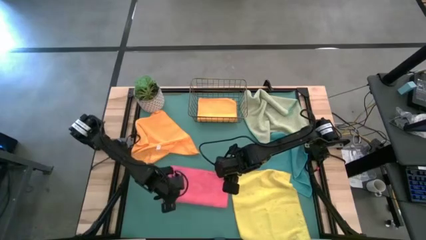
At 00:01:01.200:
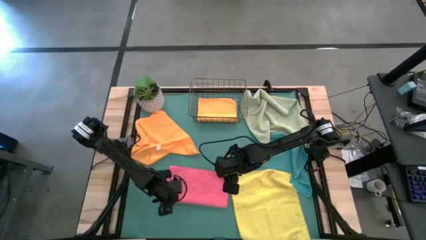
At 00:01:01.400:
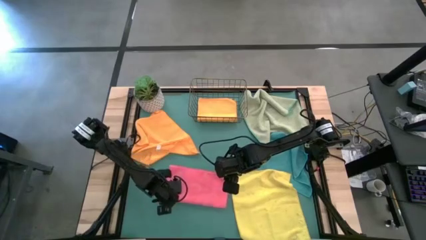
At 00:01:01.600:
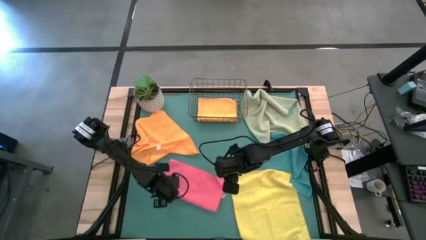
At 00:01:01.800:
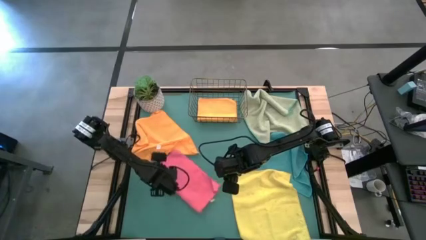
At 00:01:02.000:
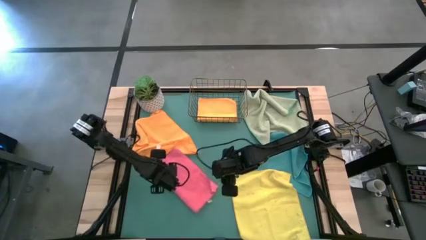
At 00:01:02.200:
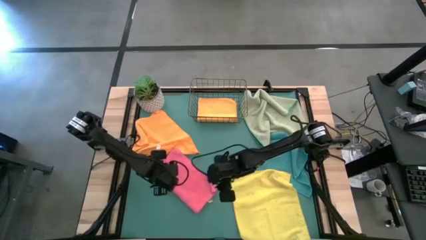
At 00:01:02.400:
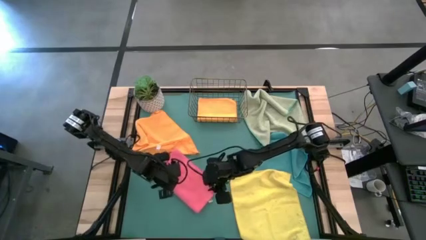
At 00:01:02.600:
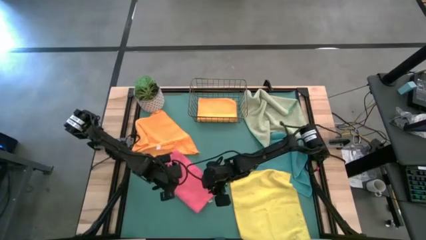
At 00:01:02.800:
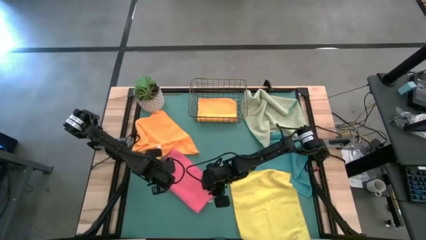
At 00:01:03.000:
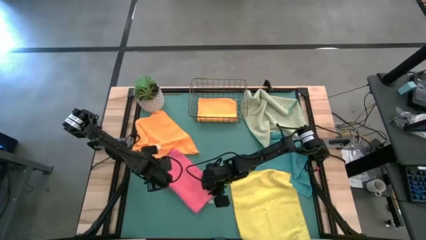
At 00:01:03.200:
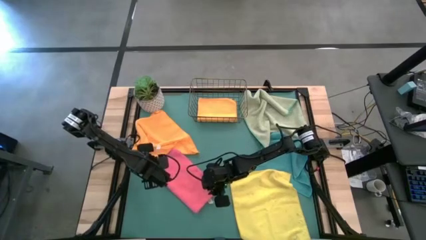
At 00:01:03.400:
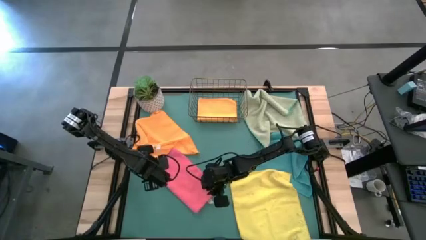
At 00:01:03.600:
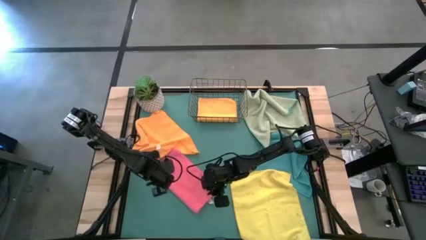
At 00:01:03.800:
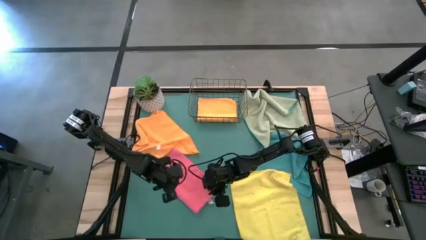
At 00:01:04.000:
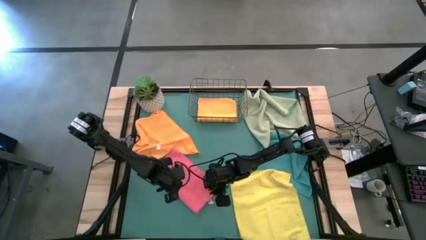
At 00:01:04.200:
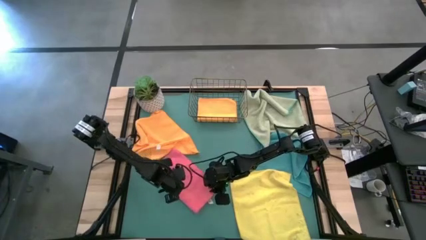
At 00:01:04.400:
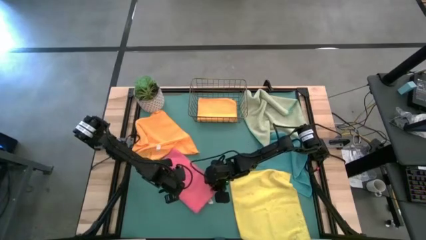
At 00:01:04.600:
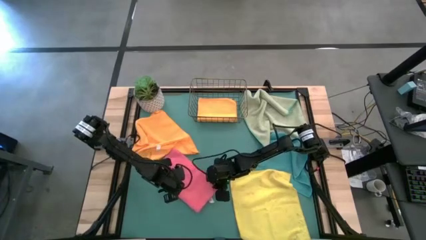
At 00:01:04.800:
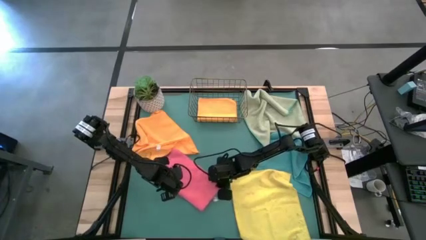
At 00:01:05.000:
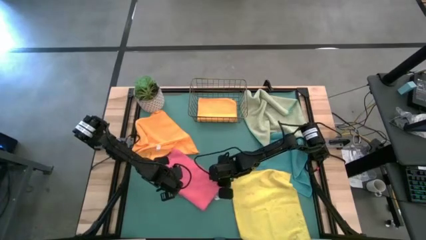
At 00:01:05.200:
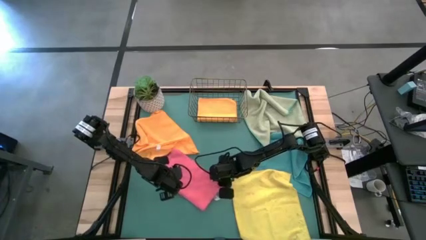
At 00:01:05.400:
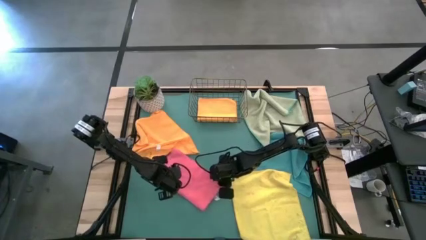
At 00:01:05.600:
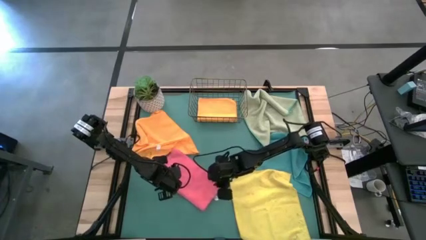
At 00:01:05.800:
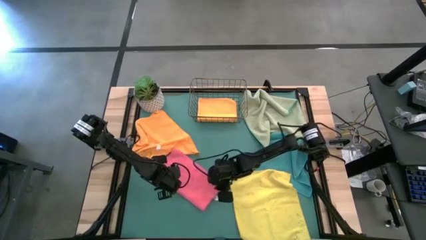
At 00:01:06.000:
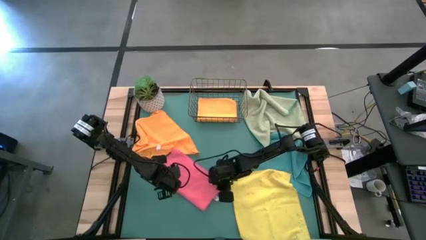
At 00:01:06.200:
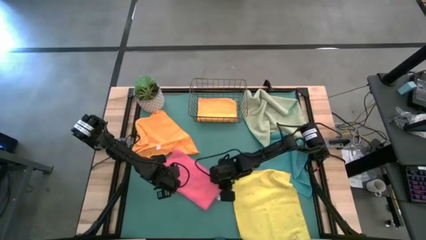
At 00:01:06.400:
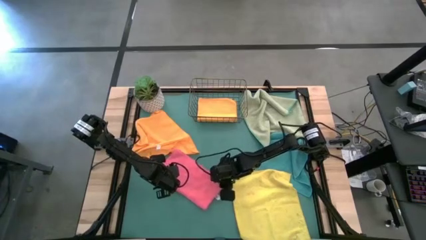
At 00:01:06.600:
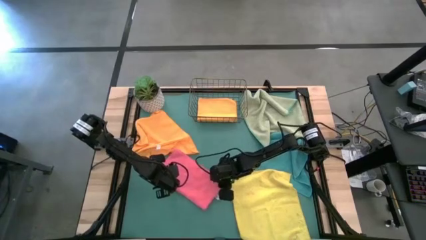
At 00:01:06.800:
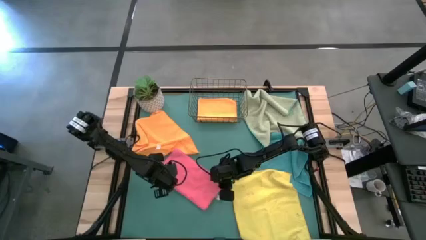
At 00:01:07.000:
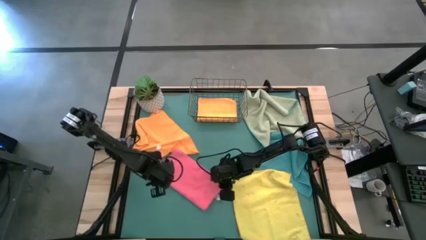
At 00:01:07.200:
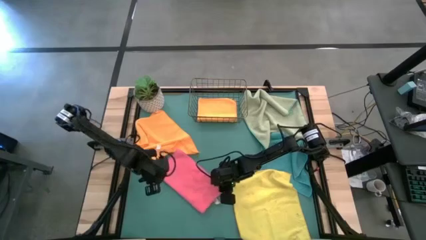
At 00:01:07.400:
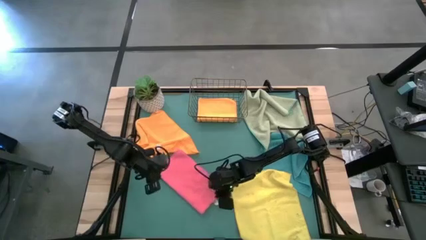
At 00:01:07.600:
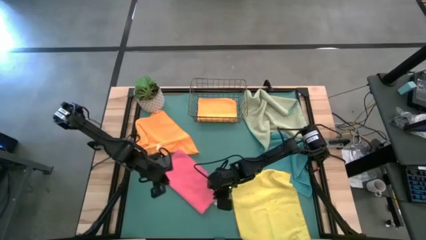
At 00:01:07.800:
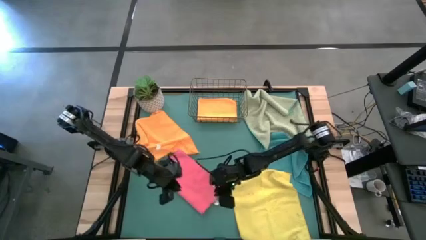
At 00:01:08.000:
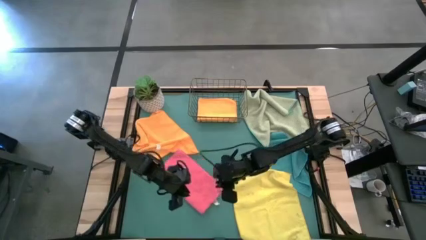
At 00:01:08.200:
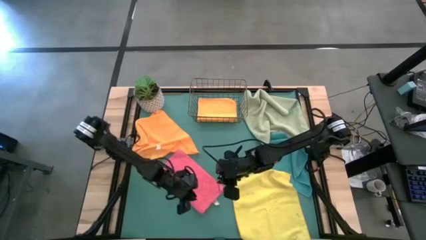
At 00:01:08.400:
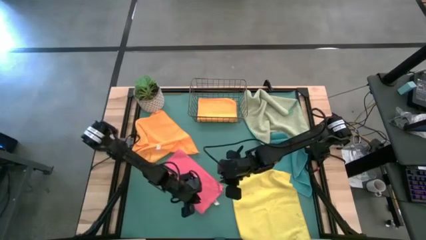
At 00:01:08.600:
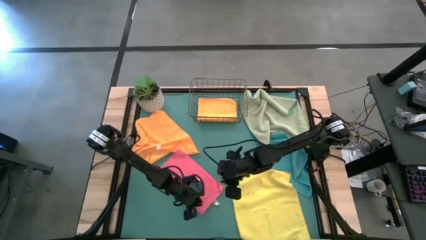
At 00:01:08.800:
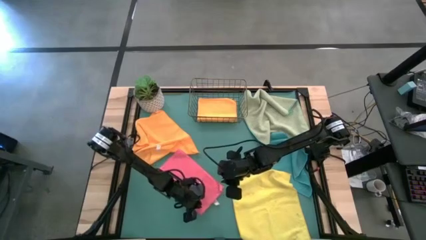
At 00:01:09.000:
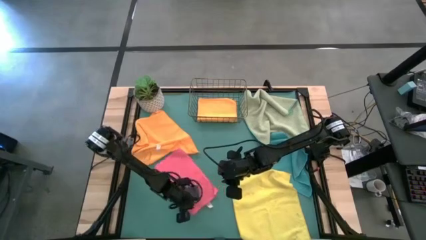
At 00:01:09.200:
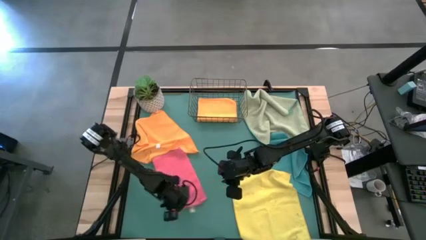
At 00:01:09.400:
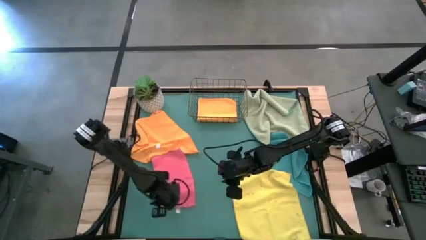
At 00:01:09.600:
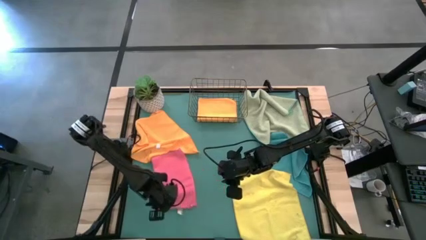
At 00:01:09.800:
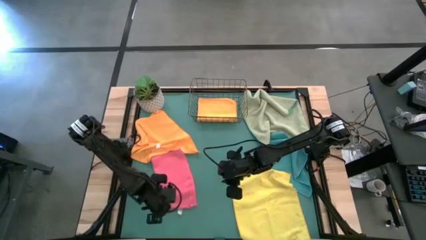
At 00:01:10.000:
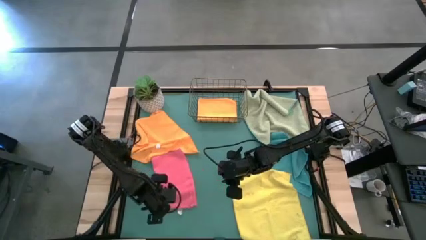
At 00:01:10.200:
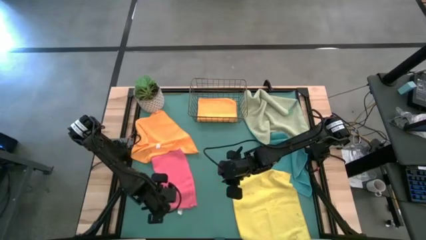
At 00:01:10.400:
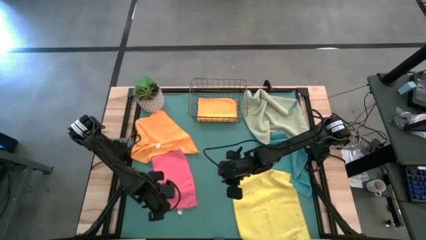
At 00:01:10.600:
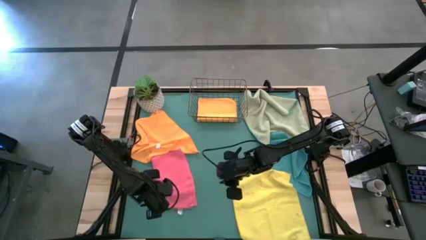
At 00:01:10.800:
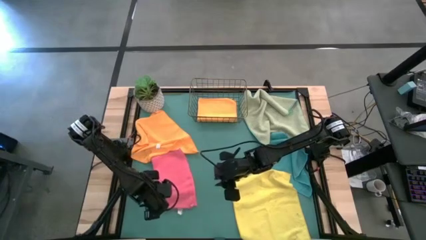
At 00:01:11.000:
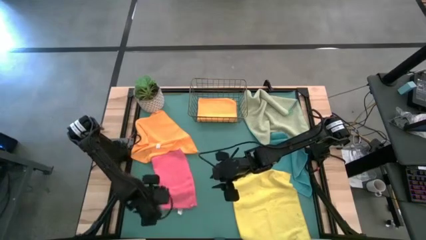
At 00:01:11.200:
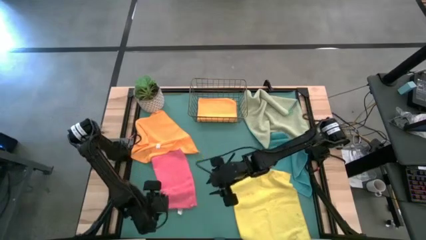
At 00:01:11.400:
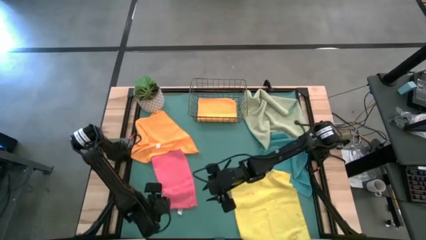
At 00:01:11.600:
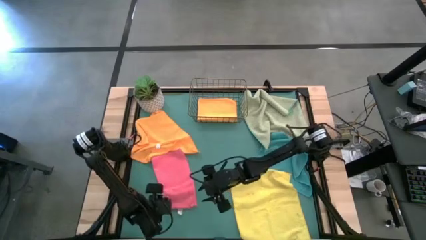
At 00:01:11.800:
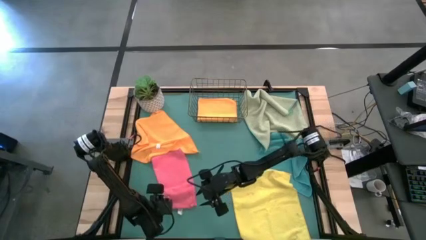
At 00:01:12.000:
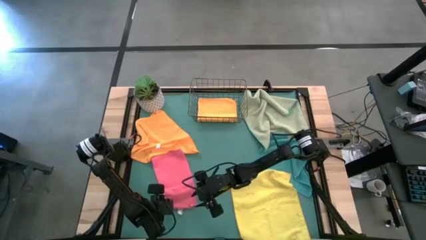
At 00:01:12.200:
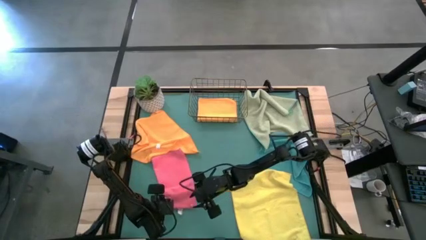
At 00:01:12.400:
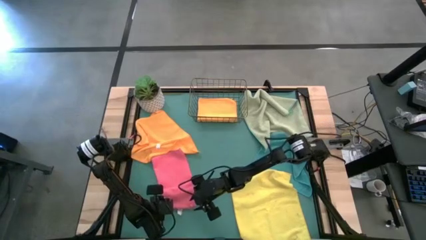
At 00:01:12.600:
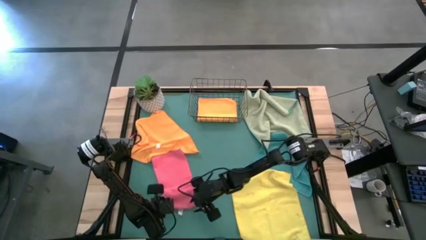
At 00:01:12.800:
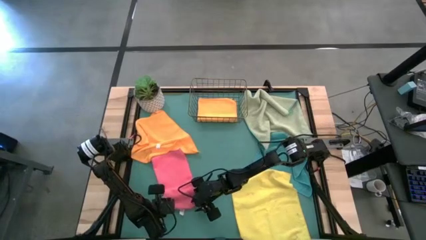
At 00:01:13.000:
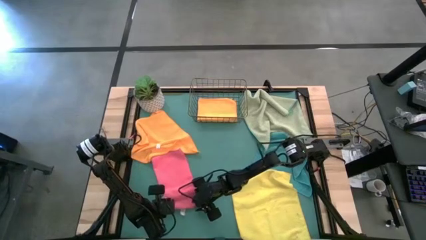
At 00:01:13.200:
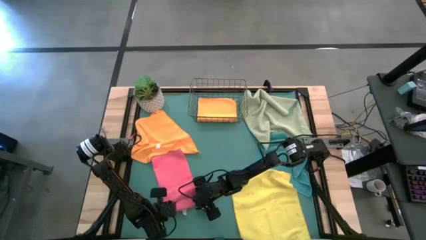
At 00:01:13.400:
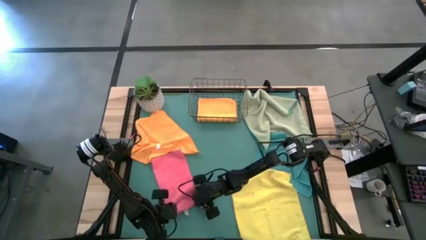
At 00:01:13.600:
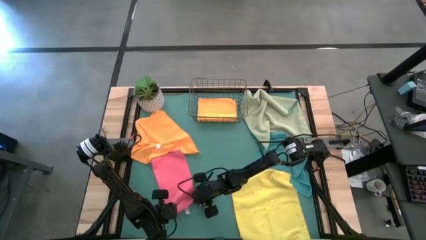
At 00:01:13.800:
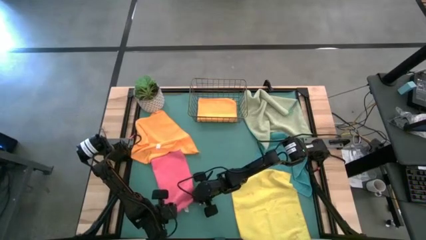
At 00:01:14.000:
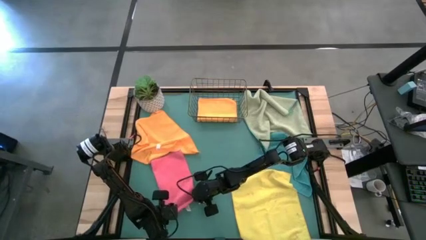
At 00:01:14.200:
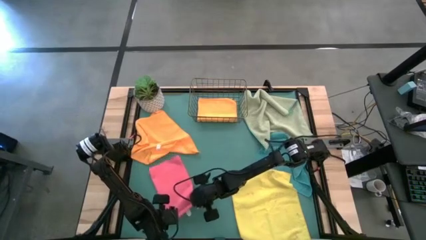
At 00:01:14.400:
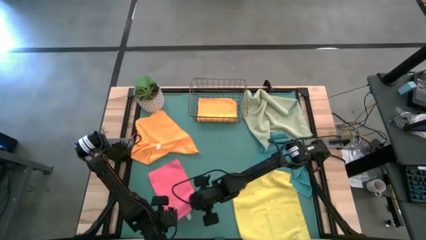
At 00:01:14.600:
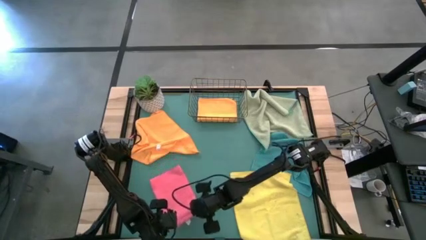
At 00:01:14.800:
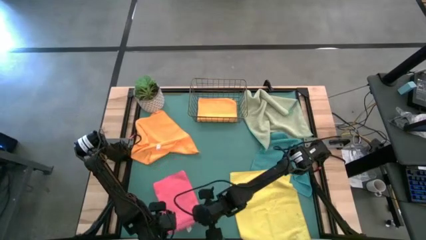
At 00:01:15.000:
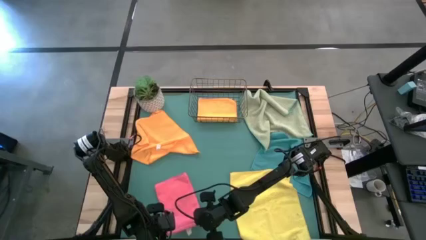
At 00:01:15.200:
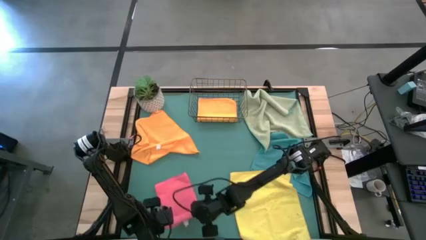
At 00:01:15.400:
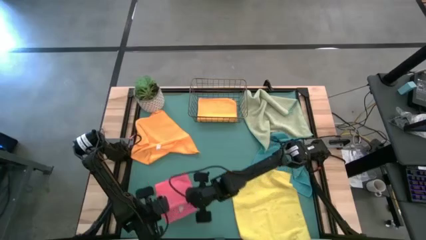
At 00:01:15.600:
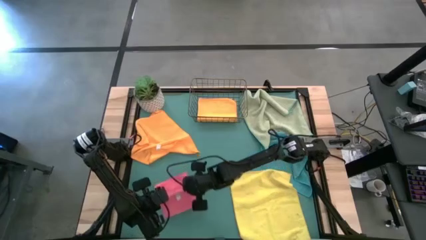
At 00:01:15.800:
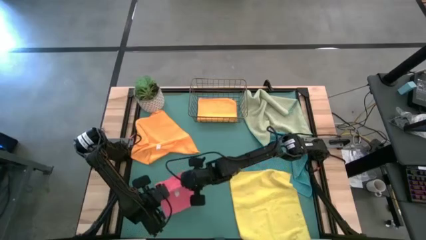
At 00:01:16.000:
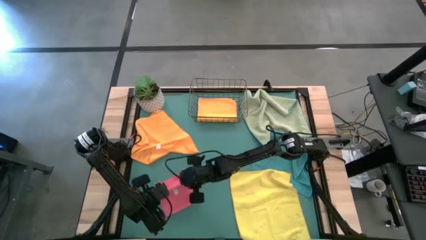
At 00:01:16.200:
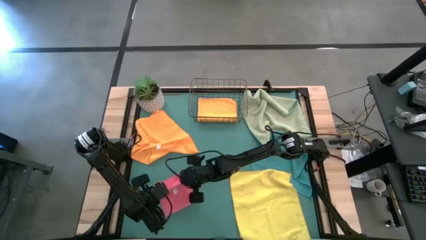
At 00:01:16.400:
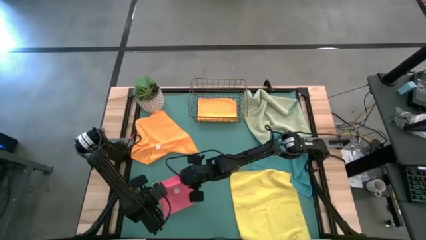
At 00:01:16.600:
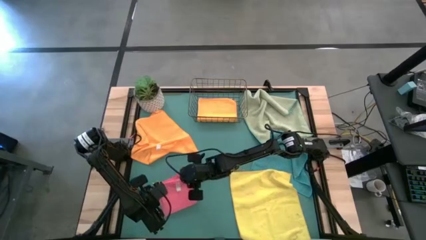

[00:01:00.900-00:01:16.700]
Task: Fold microfiber towels
Fold the pink microfiber towel
